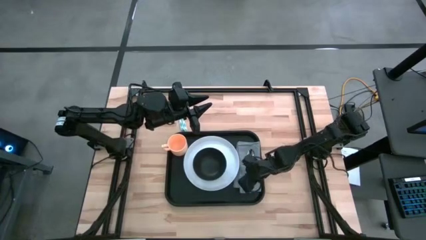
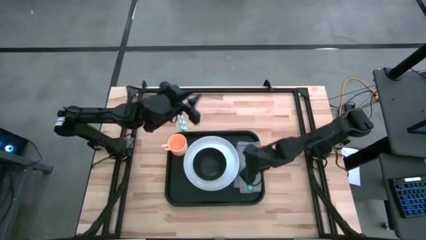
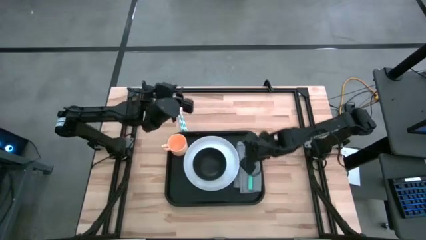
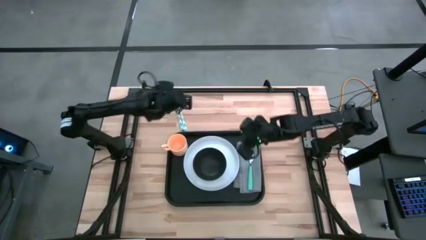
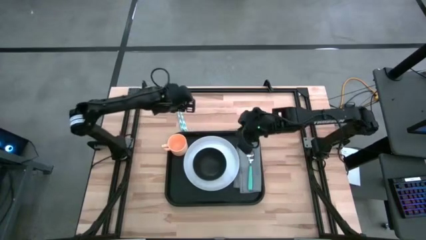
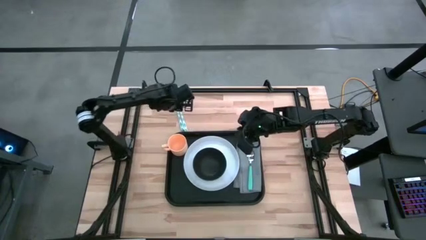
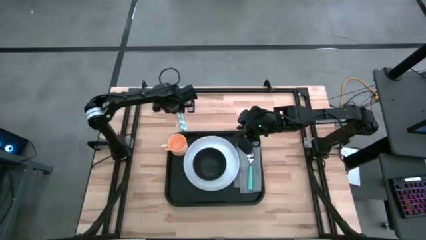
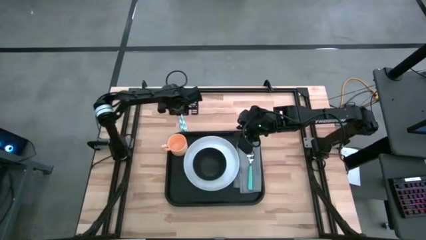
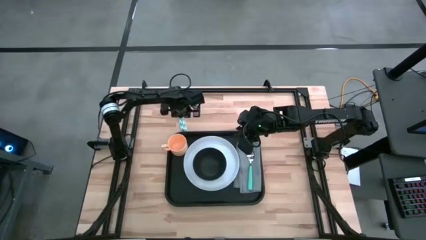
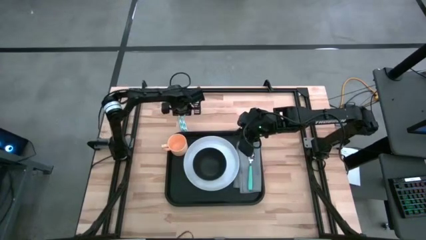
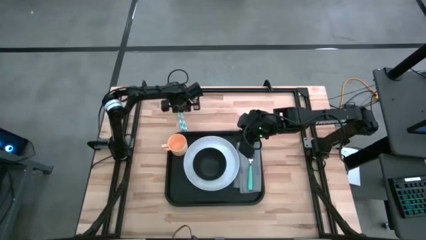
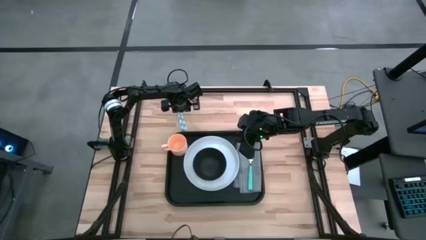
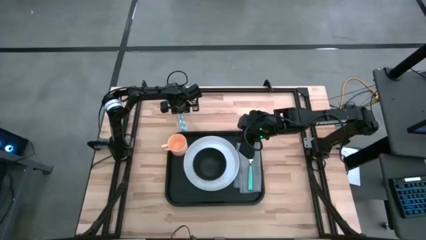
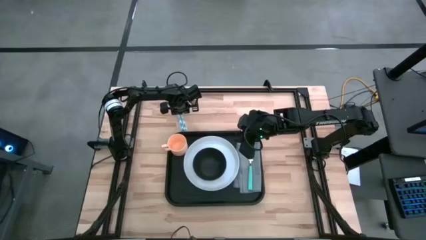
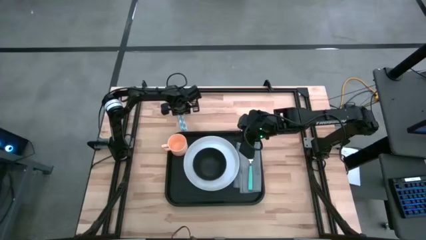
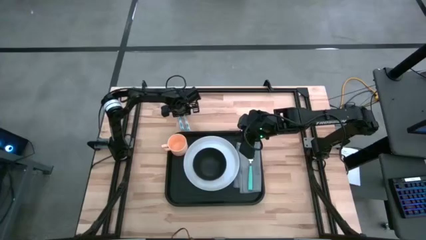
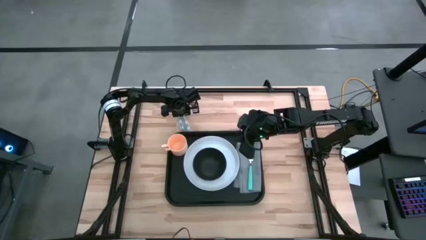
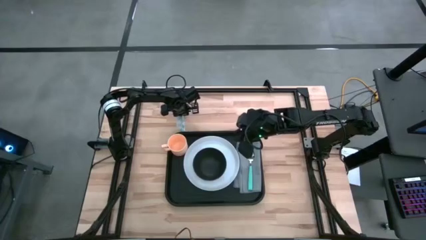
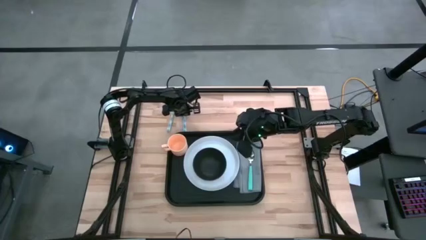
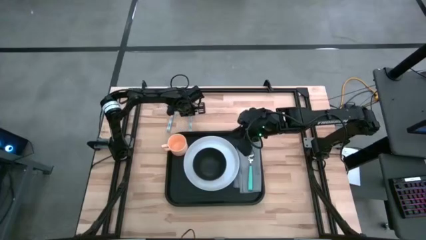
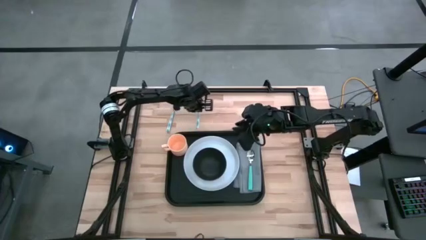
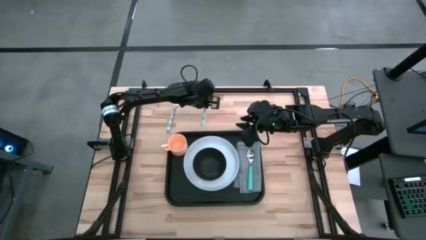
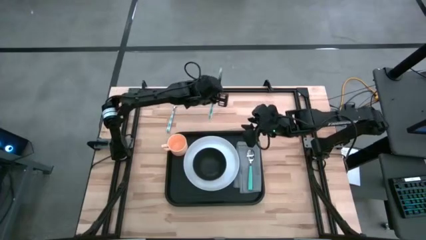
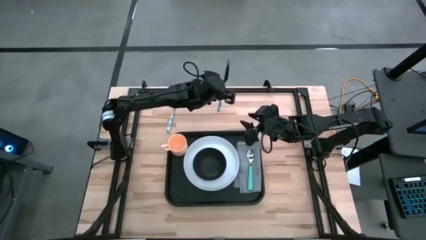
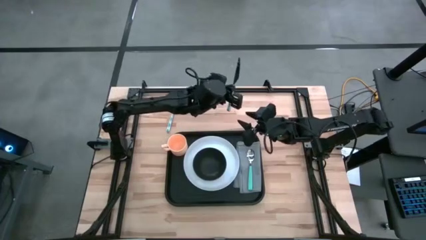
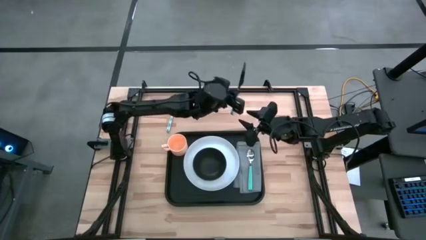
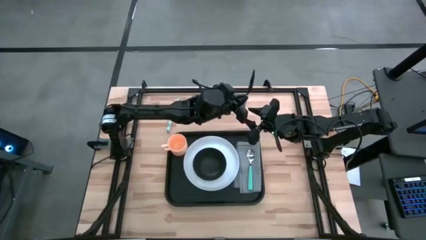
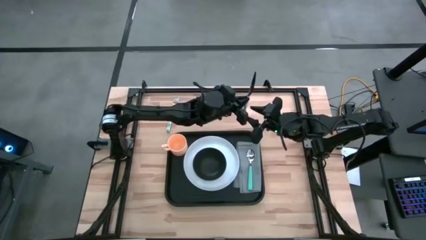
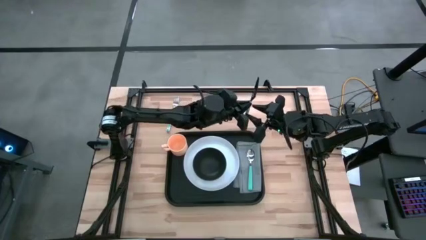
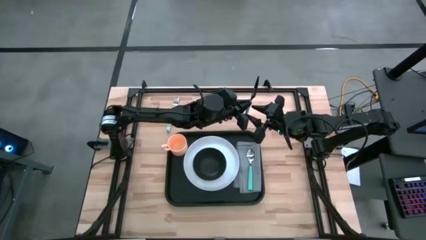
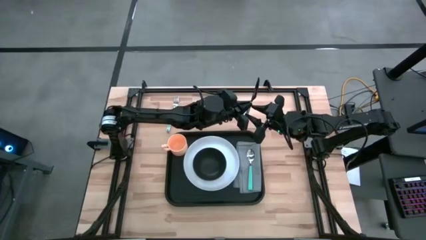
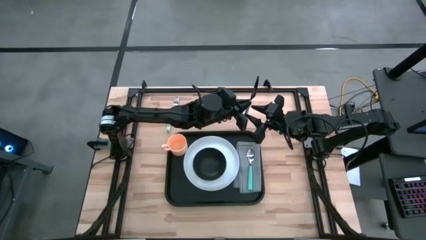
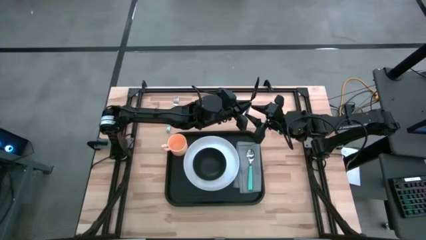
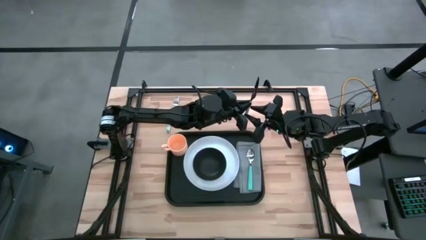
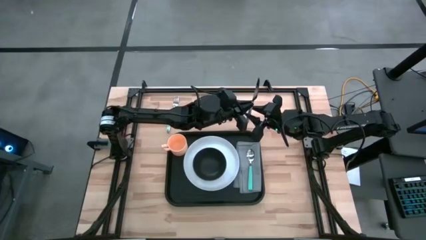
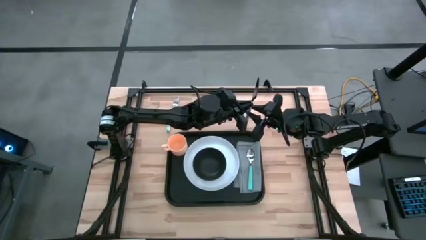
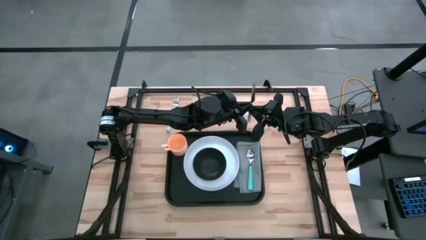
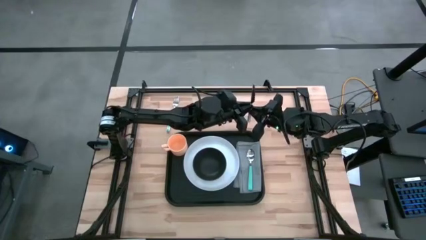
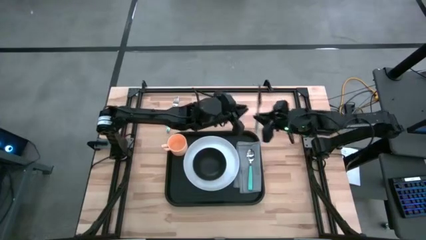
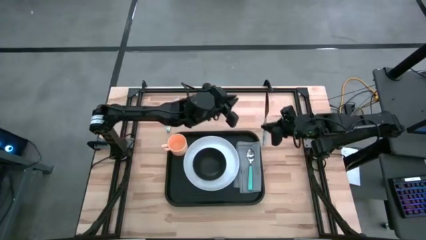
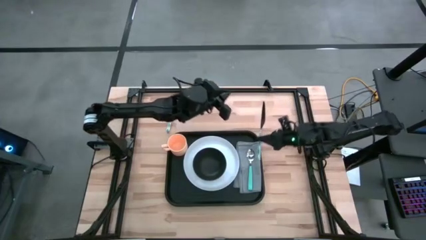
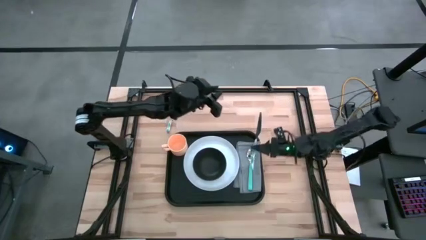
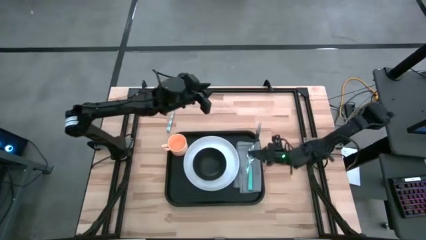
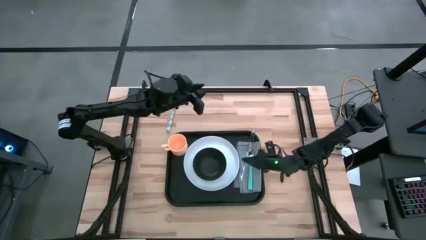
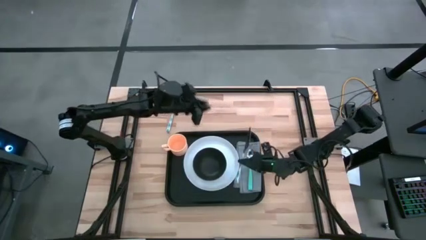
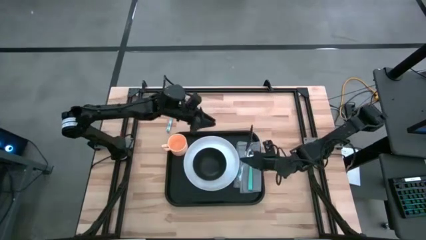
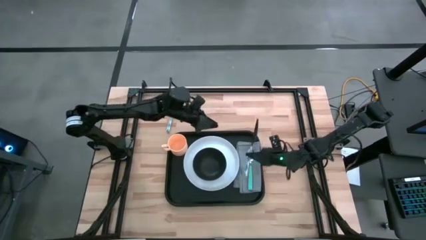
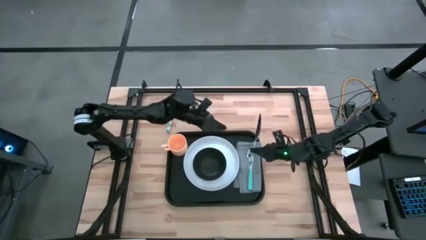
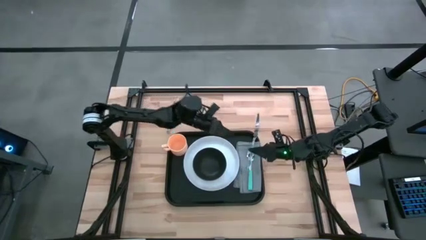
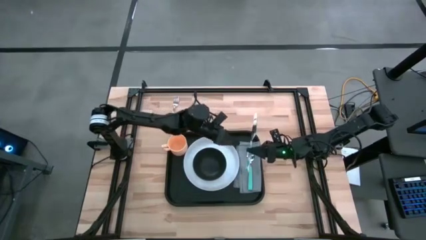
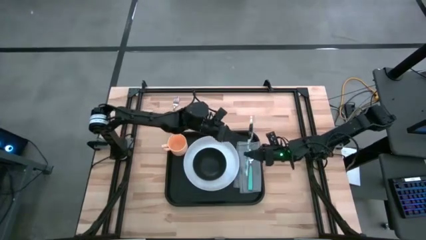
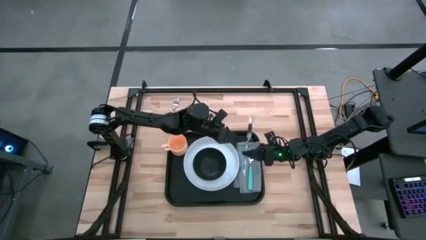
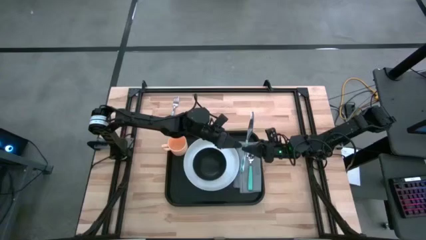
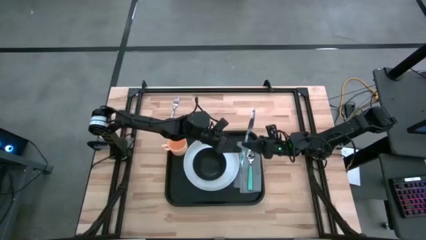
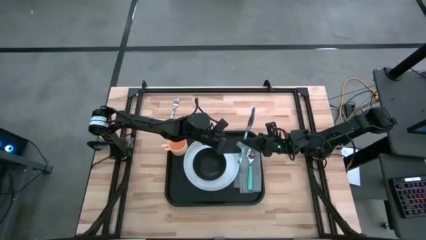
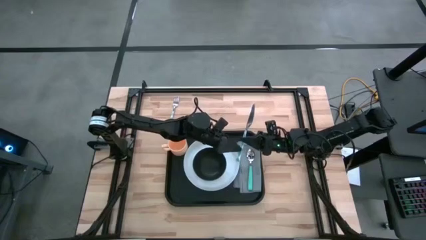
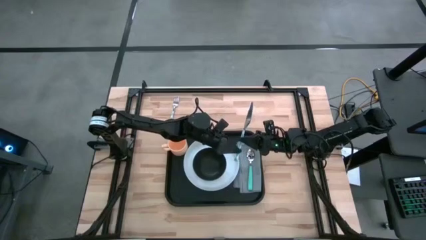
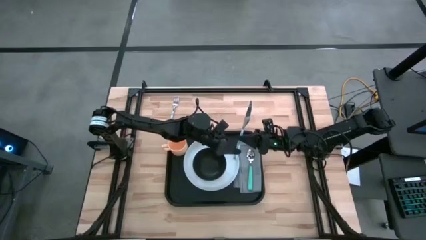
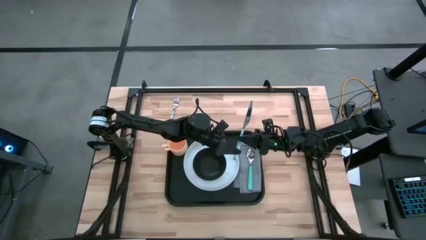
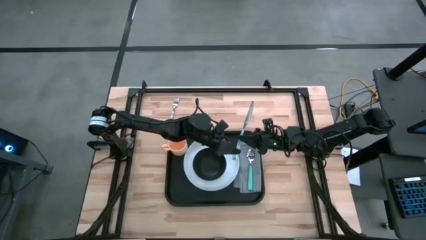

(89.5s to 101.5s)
Task: Set up tray
Put the blue knife on the gray napkin

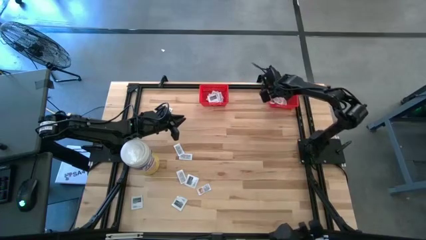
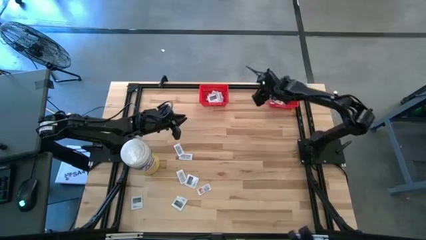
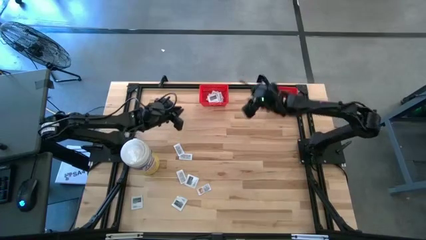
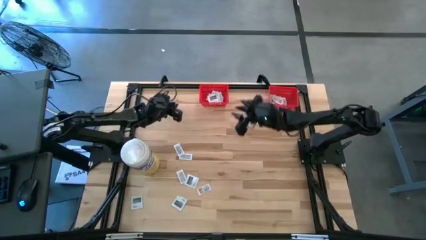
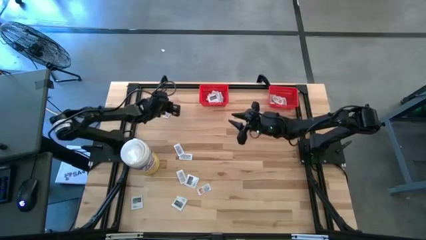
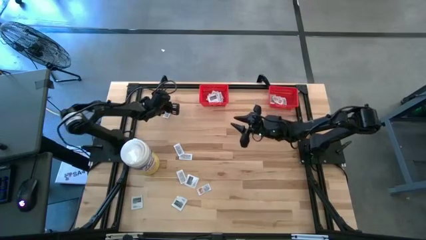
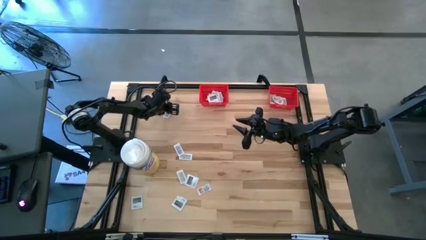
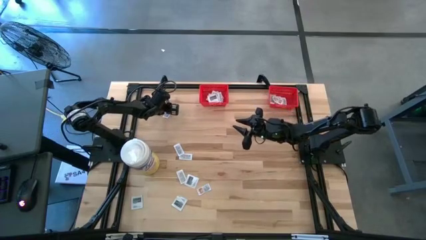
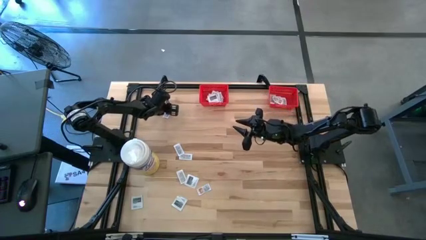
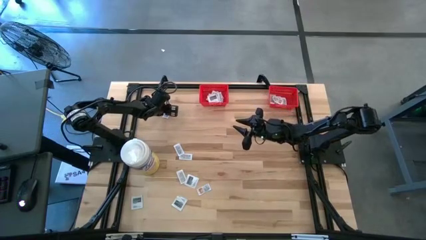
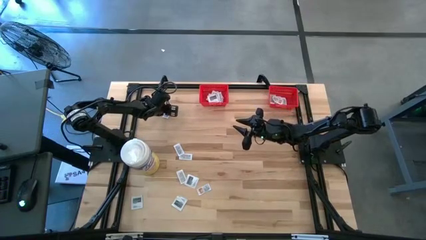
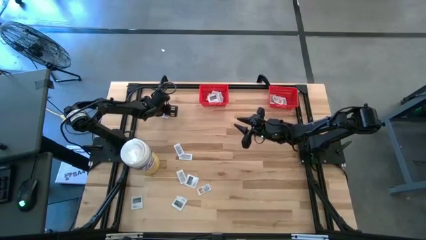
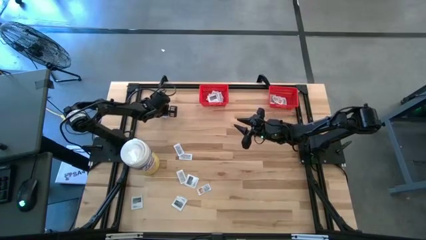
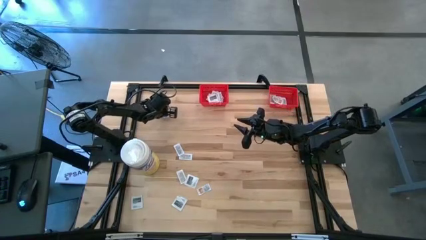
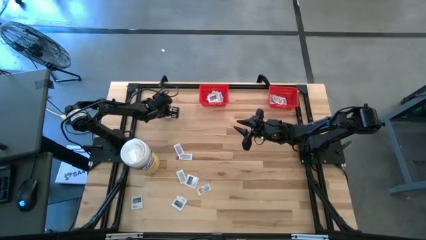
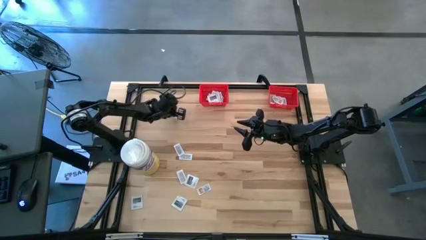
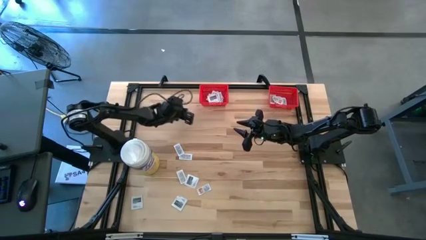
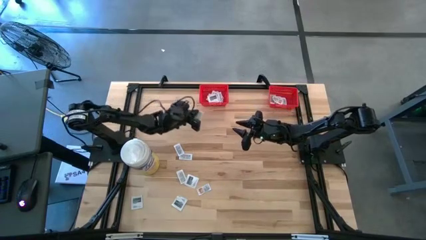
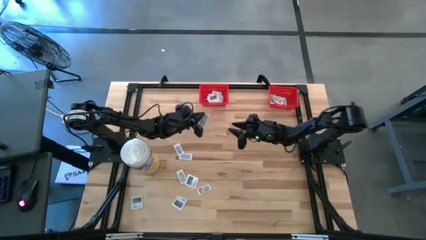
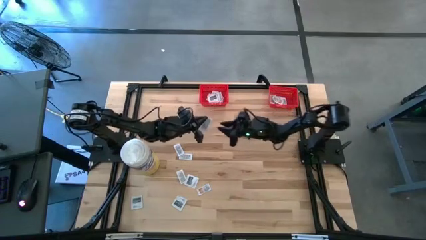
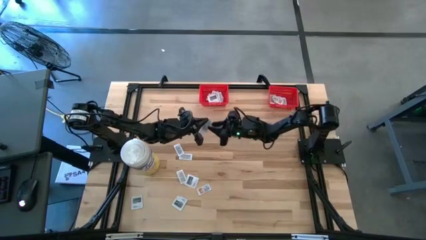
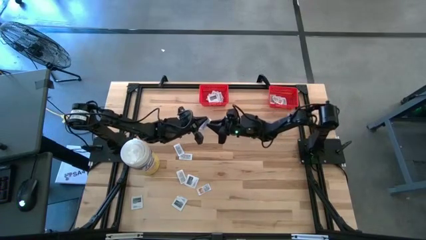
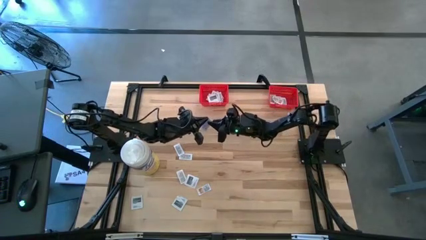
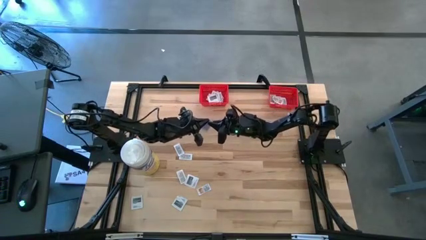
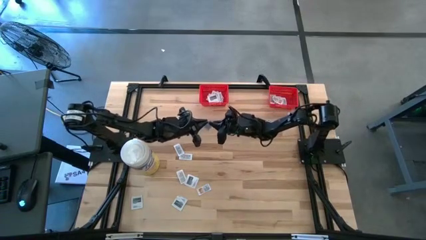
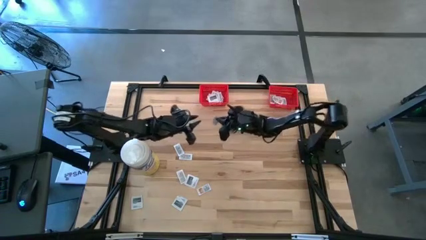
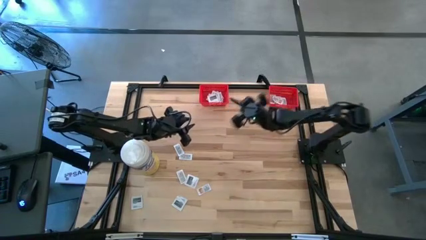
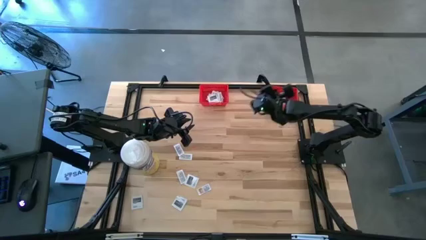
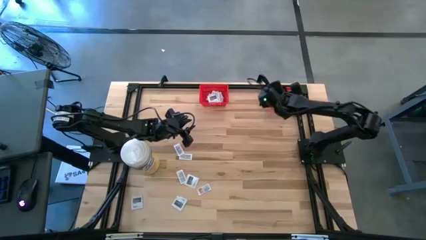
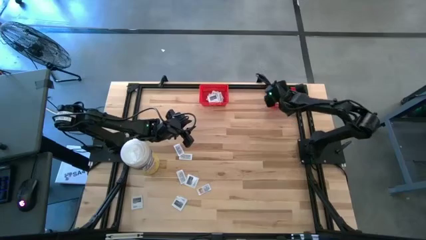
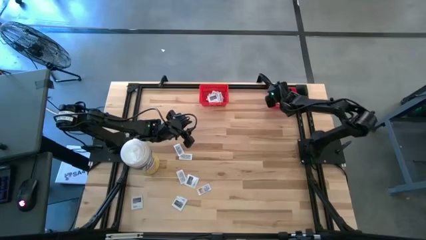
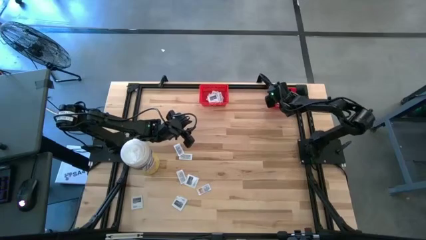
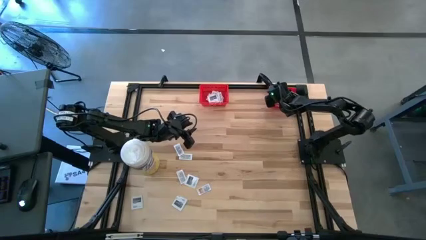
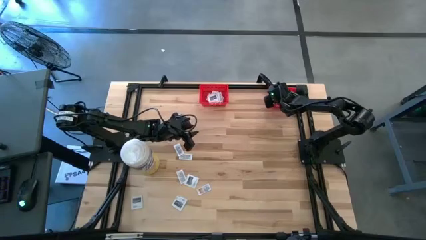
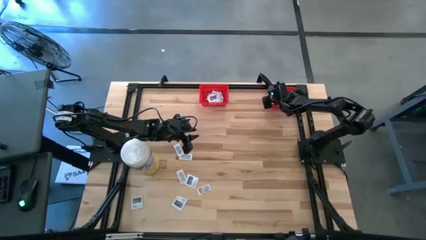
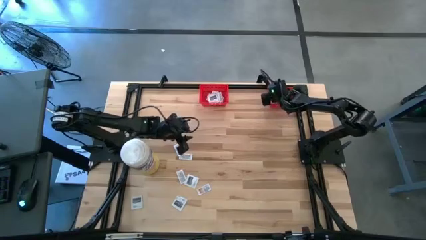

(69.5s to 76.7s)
Task: Pick & Place First Aid Supplies
Put the ointment pack into the right red bin
